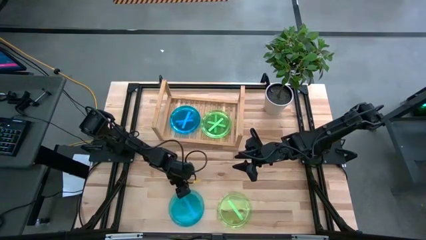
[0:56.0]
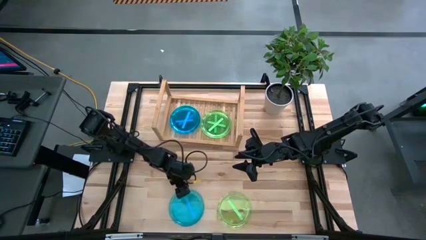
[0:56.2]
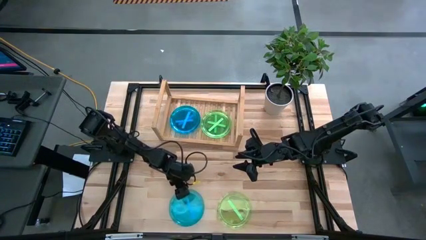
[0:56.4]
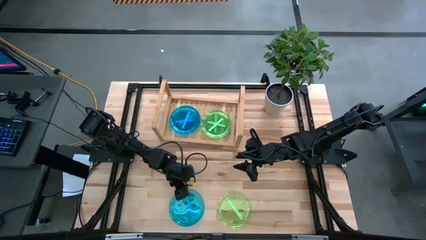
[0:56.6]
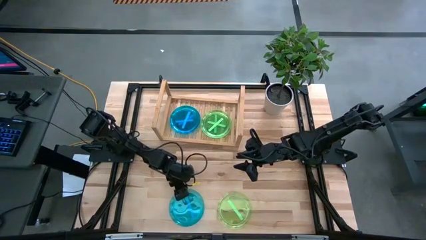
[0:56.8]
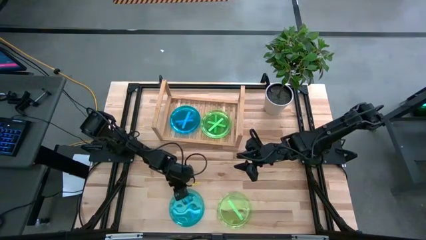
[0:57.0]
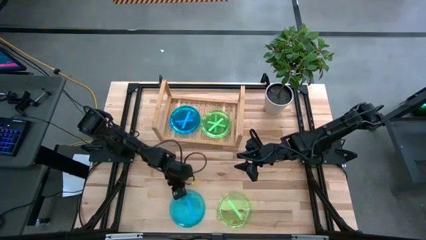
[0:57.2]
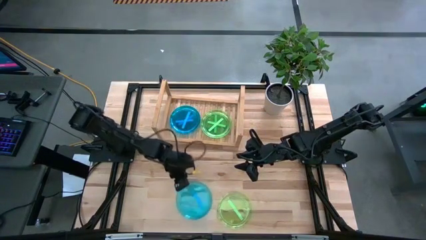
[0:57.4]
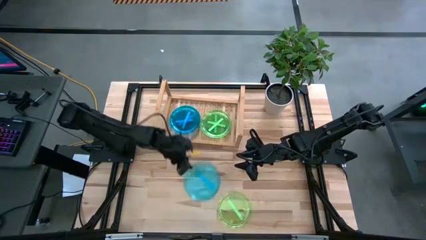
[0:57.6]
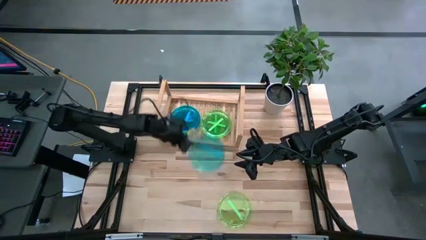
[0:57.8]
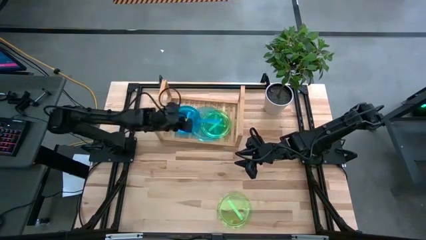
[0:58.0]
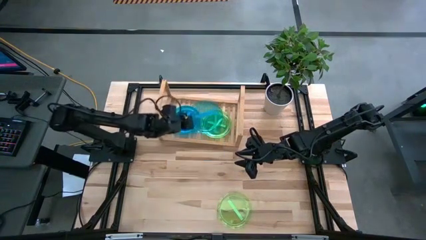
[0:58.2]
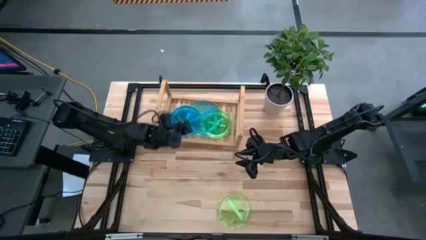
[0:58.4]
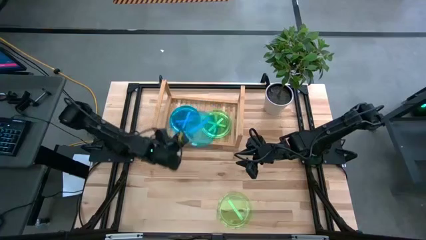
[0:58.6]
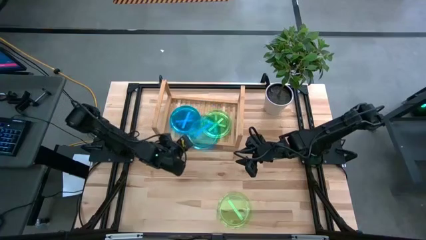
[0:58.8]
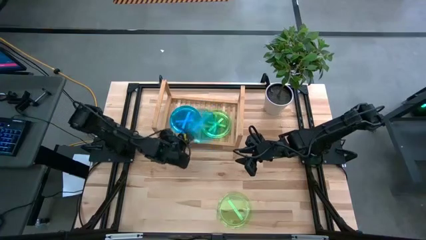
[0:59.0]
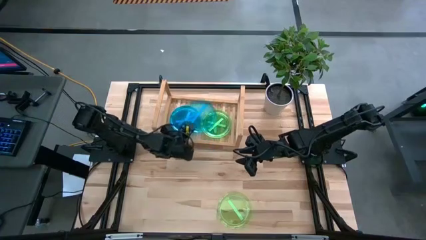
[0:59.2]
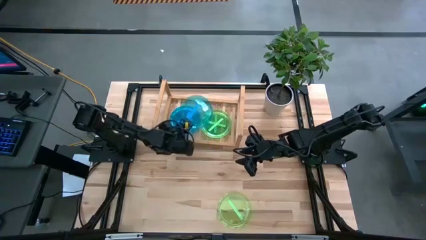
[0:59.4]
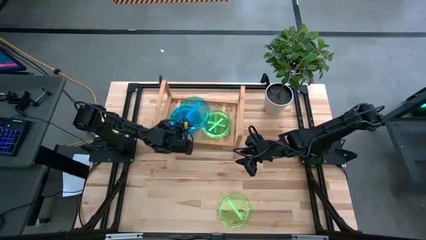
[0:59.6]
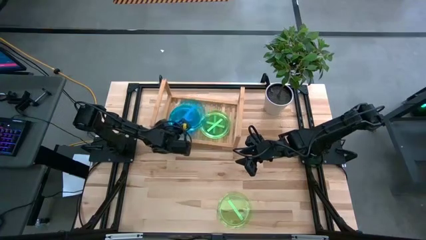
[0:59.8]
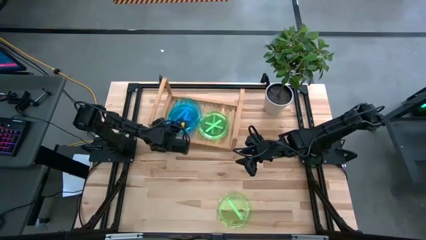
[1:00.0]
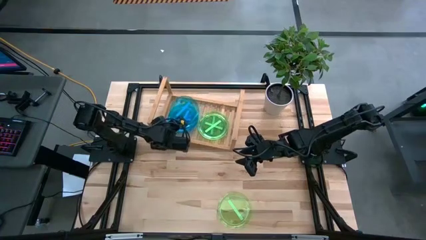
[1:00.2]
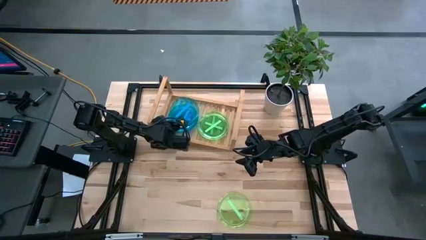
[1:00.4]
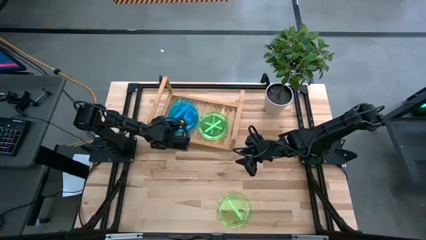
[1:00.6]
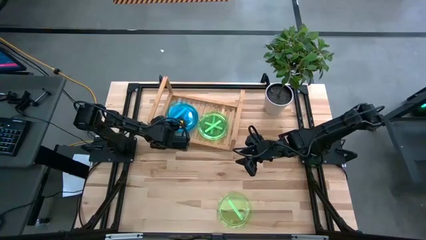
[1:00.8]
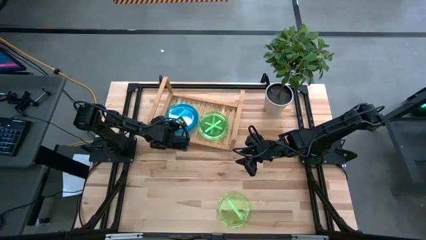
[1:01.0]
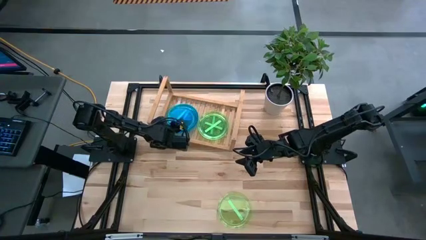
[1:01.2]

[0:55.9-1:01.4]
Task: Place and stack plates onto a shelf
Stack the transparent blue plate on top the transparent blue plate on the shelf

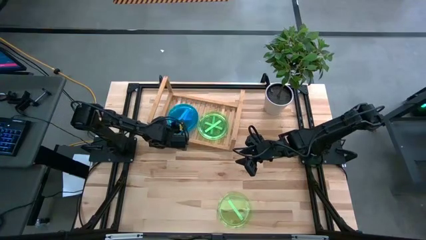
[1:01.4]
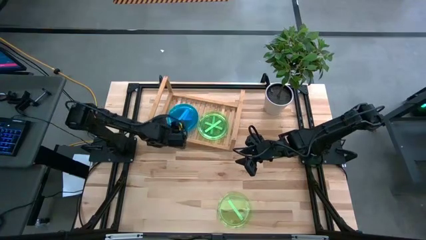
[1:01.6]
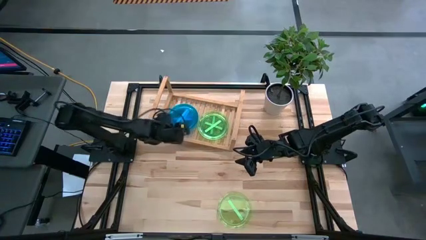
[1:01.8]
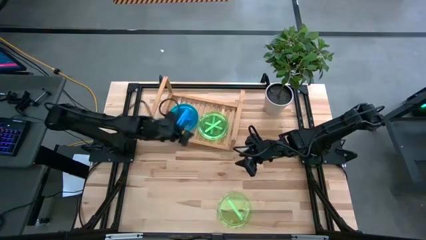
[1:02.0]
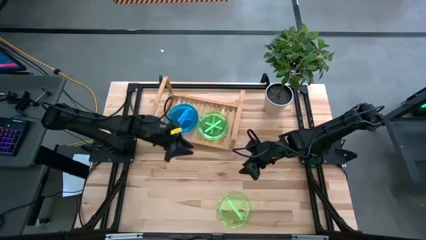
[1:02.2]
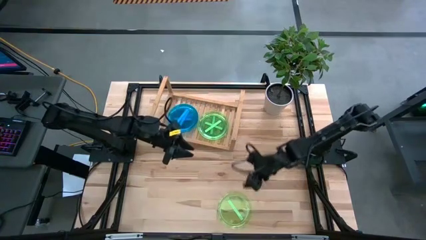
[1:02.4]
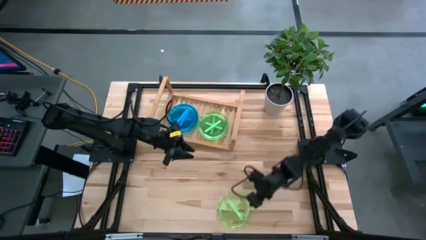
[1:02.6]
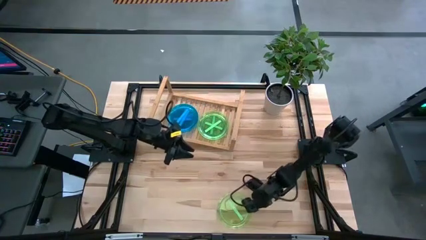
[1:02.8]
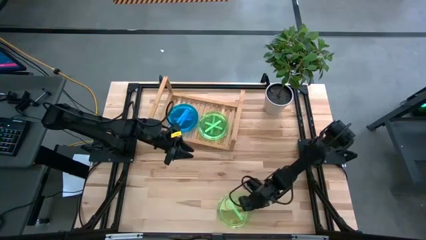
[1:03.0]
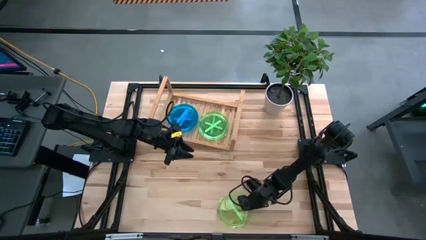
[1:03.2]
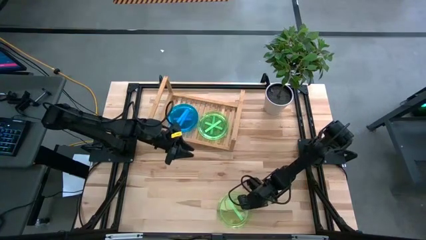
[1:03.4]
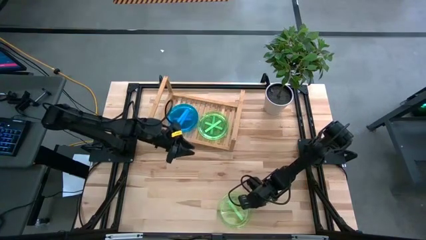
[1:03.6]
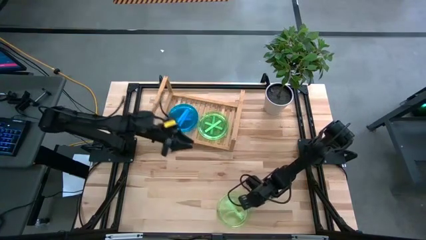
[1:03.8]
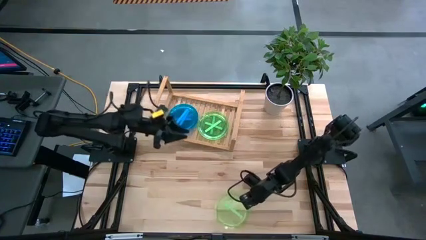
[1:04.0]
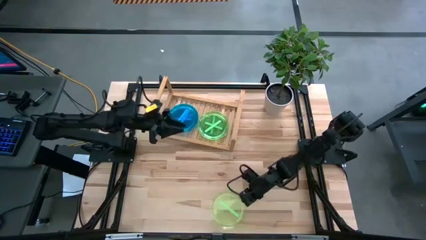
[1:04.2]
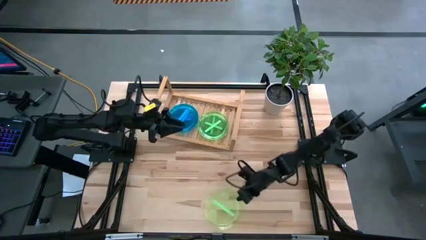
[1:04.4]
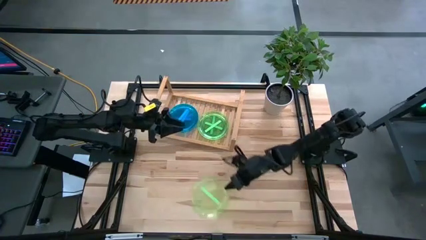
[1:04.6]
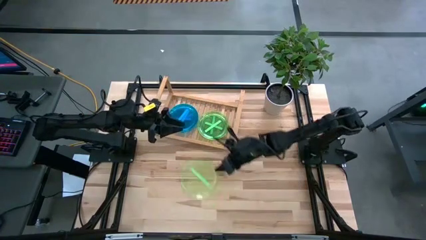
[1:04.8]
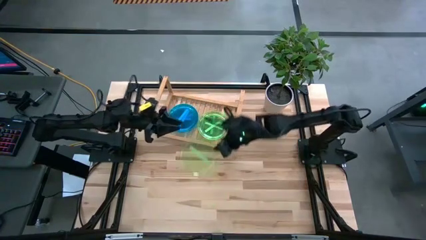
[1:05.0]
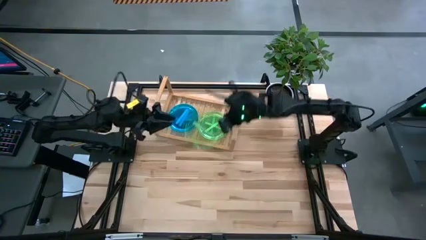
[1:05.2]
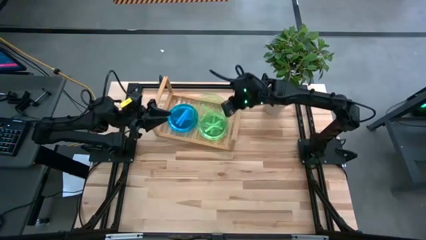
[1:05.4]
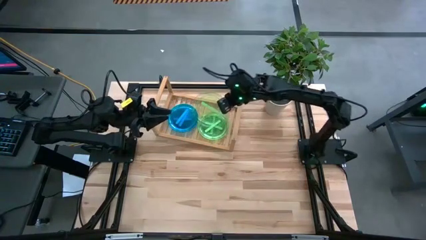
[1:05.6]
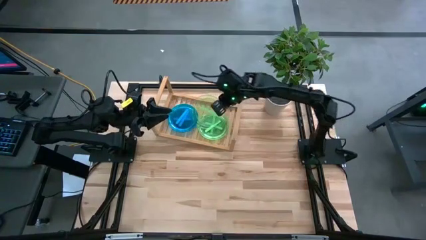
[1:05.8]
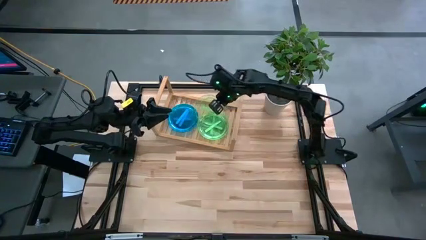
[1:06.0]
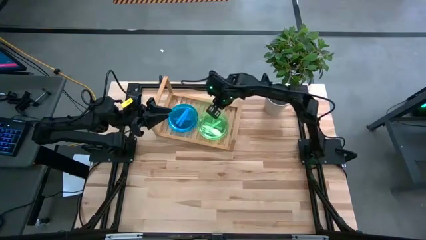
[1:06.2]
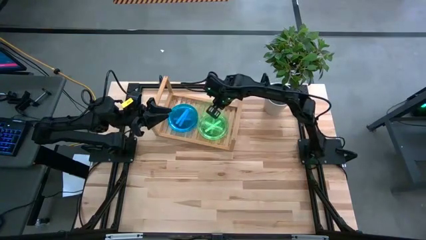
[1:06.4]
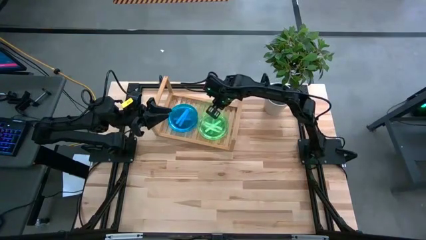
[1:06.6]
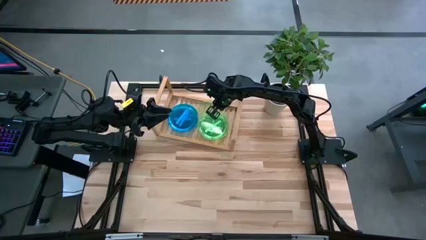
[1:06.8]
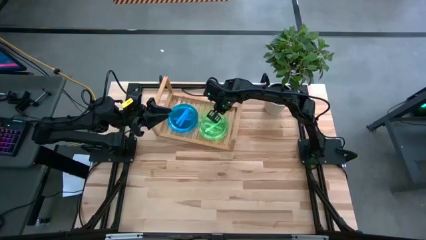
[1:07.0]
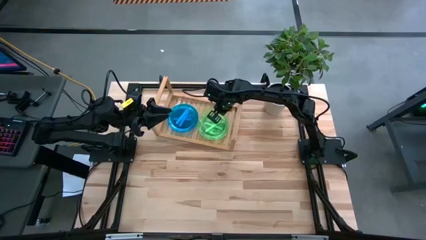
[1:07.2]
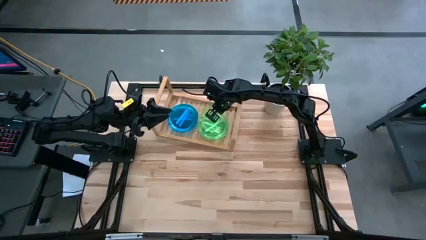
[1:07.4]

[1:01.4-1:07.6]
Stack the transparent green plate on top of the transparent green plate on the shelf

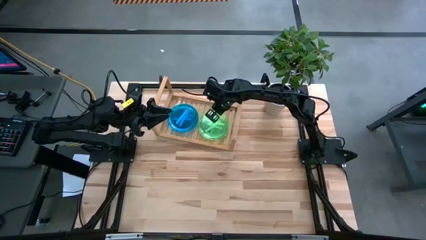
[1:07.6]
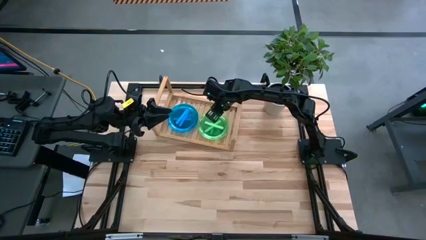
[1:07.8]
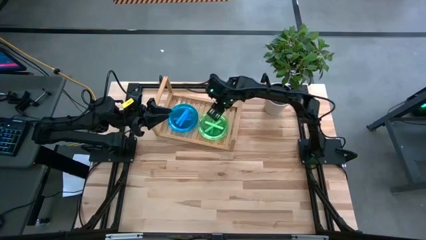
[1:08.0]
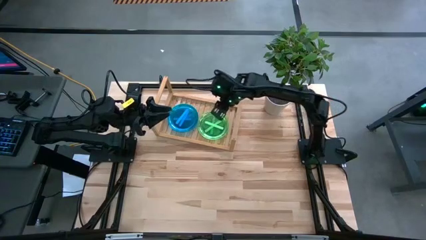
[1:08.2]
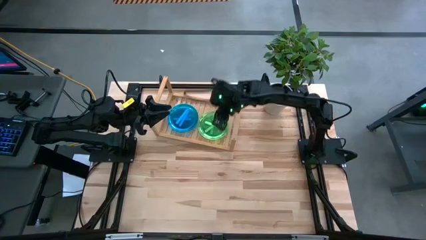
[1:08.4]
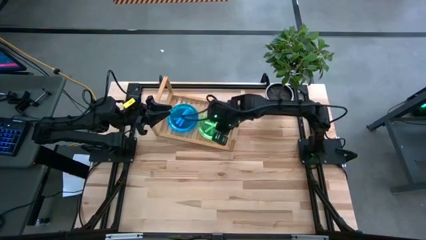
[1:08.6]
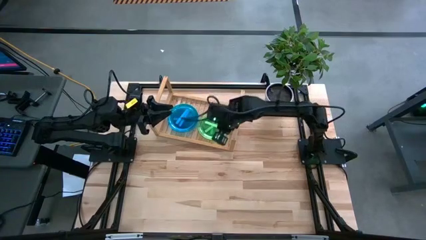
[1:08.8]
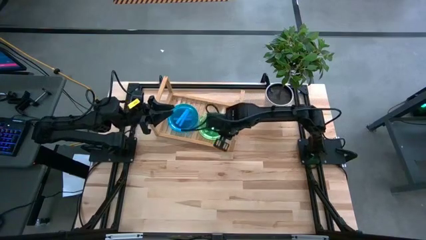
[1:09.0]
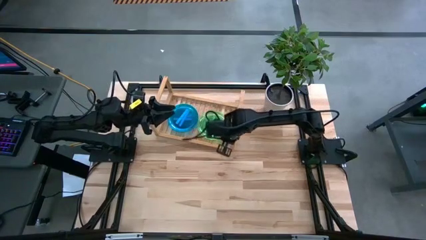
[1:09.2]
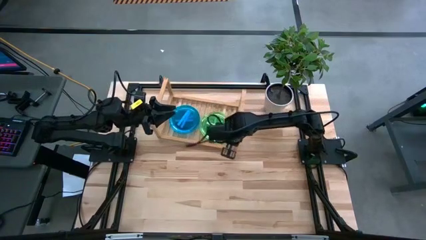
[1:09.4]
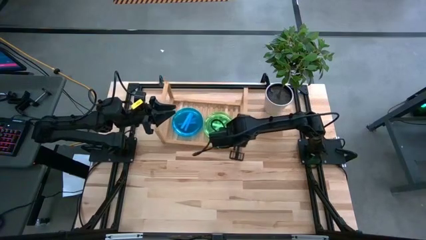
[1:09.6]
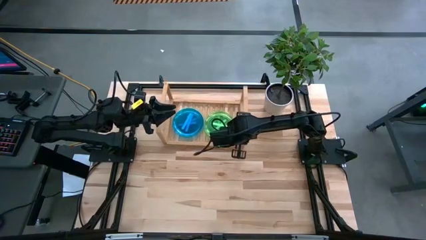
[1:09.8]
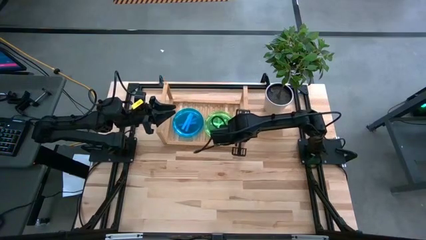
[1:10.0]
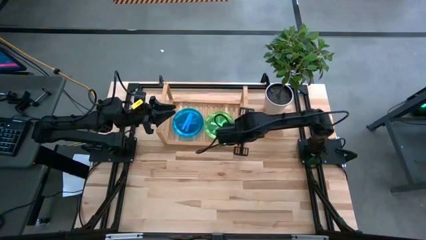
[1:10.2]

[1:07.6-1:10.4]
Adjust the position if the bin

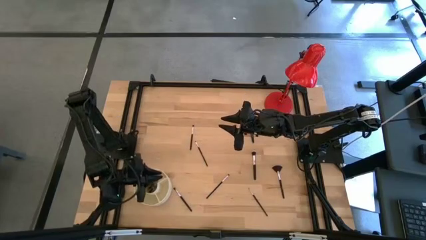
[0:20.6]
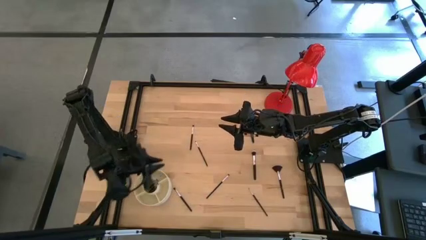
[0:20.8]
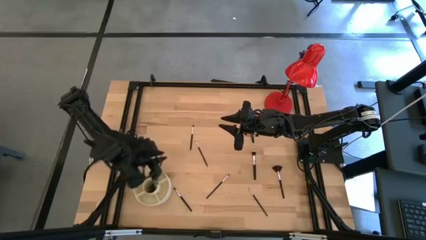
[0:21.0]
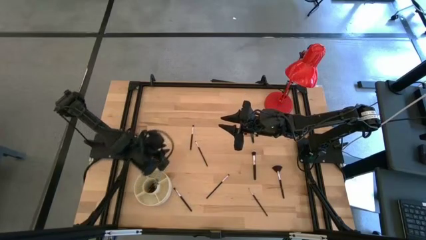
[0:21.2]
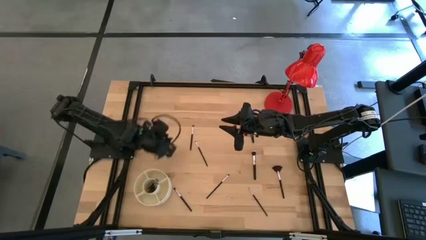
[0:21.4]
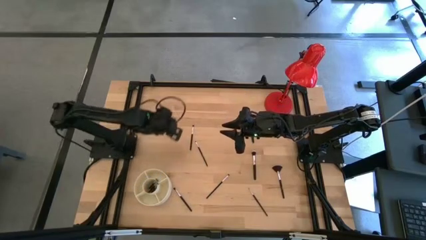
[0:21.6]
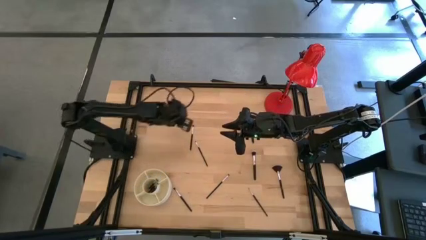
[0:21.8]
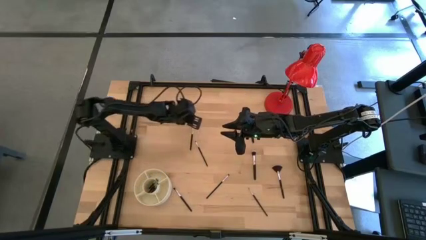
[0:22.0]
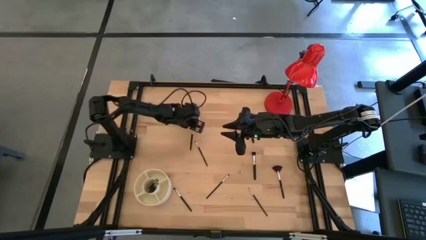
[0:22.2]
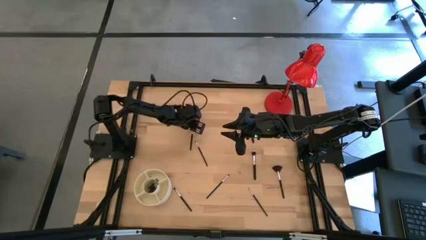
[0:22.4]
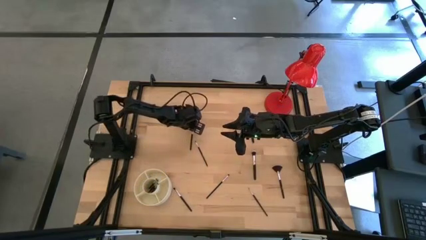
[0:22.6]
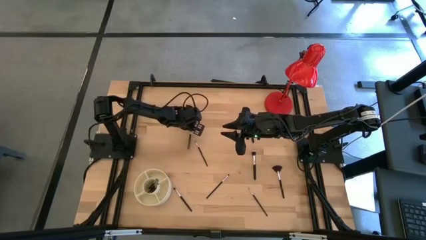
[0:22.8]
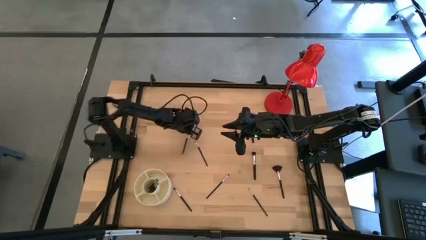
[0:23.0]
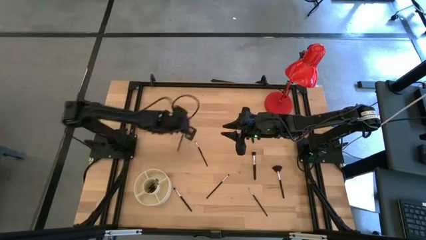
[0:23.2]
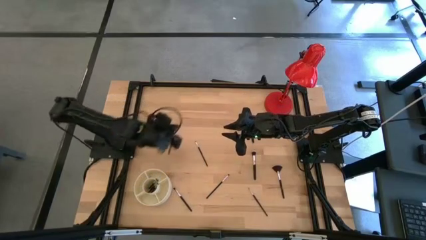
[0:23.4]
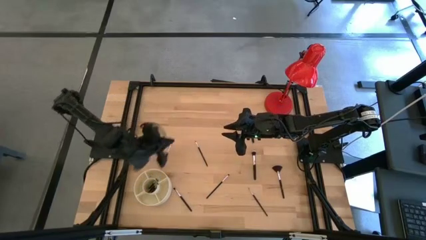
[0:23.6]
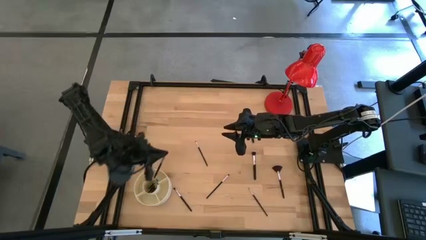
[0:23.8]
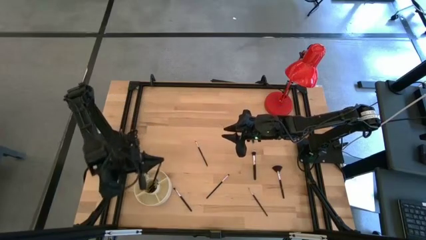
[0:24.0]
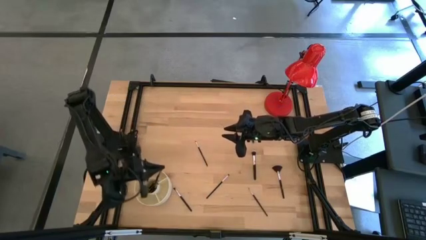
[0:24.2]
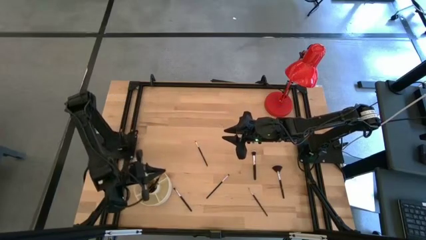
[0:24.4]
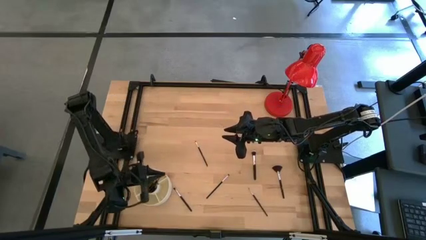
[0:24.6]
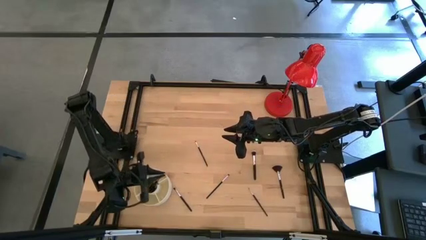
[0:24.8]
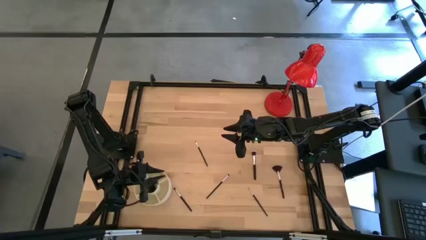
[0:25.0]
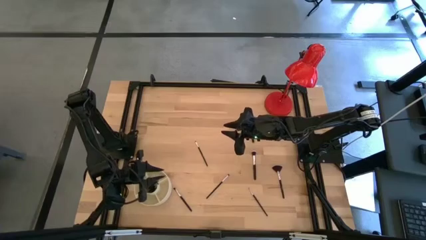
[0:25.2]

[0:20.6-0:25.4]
Task: Put items in baskets/containers
Put the black eyeshadow brush into the white organizer
